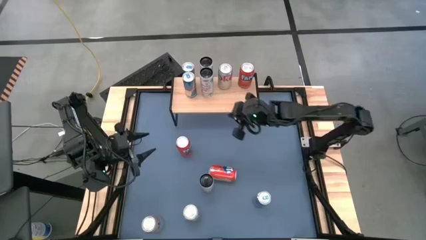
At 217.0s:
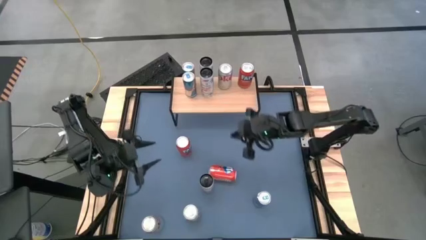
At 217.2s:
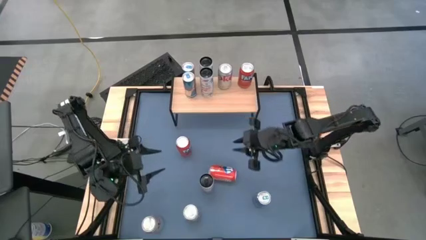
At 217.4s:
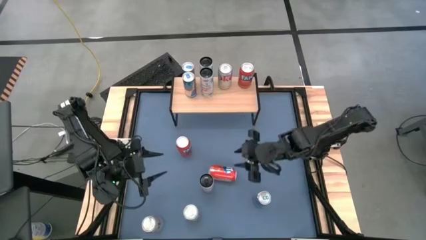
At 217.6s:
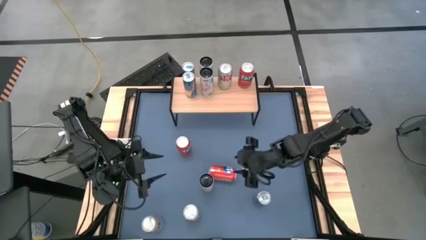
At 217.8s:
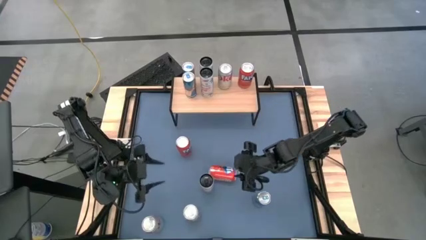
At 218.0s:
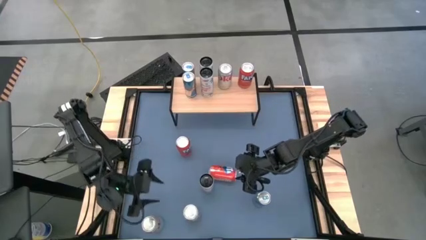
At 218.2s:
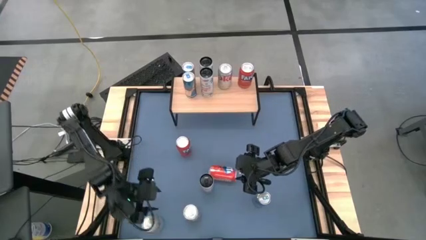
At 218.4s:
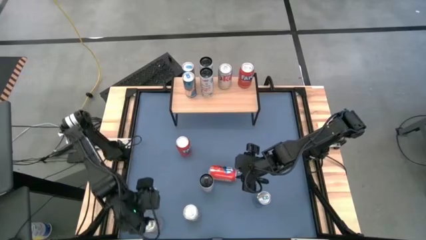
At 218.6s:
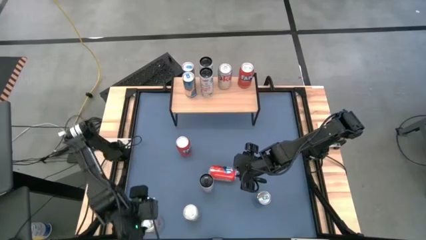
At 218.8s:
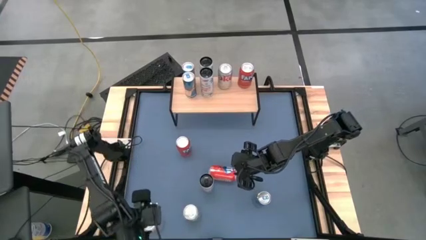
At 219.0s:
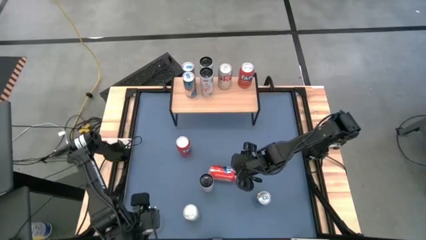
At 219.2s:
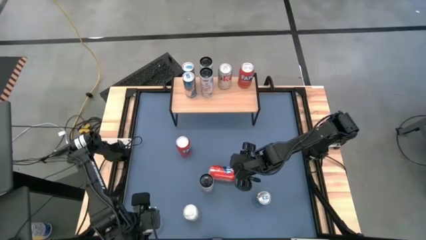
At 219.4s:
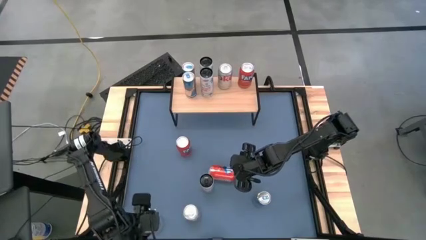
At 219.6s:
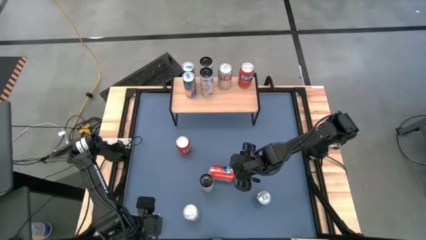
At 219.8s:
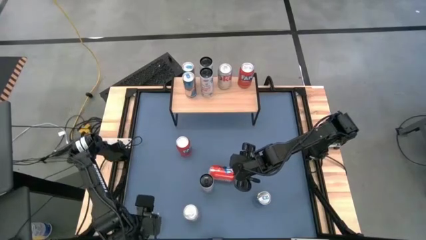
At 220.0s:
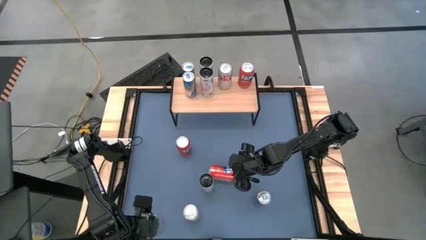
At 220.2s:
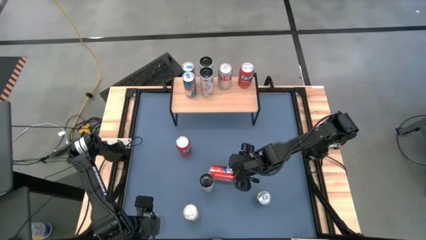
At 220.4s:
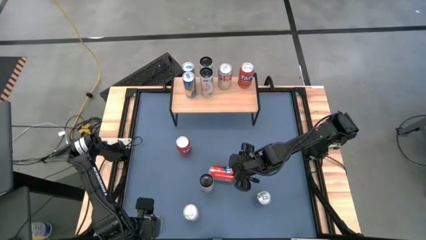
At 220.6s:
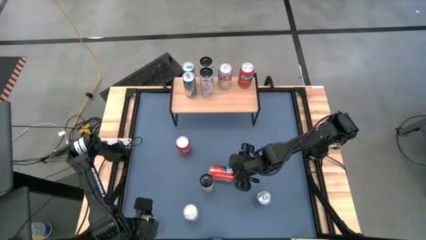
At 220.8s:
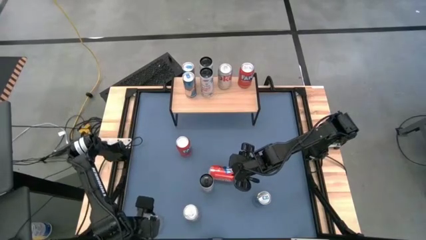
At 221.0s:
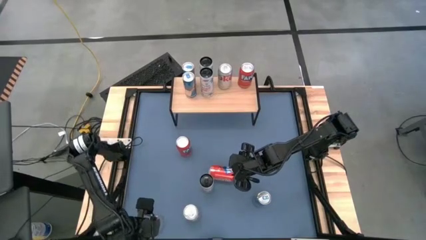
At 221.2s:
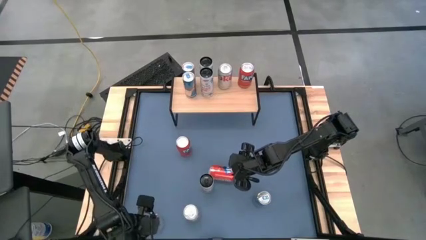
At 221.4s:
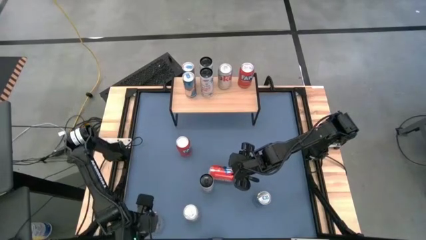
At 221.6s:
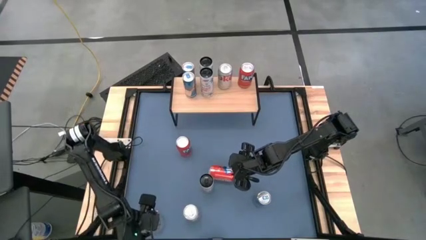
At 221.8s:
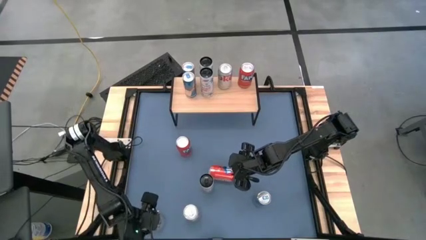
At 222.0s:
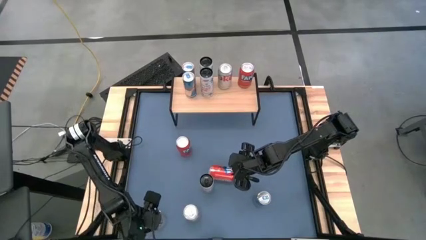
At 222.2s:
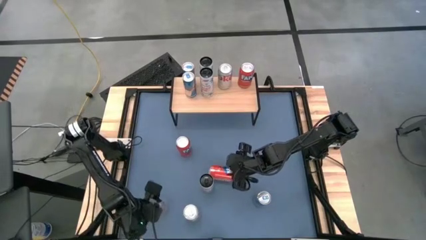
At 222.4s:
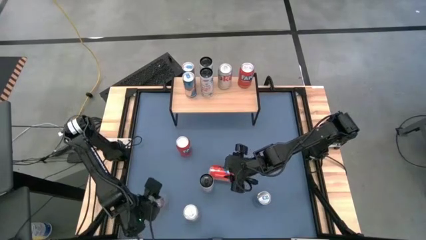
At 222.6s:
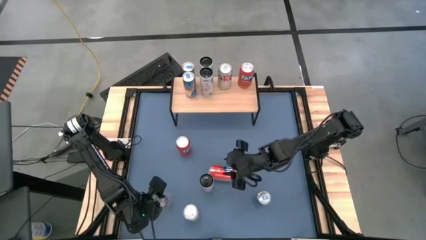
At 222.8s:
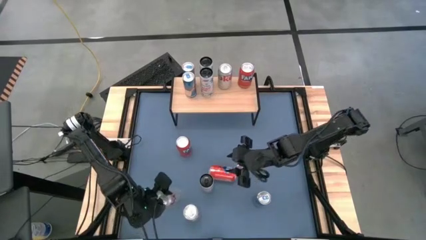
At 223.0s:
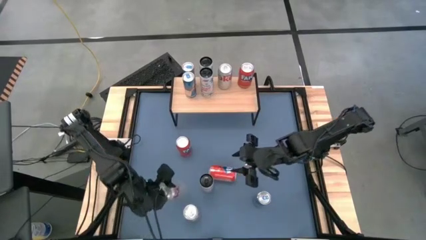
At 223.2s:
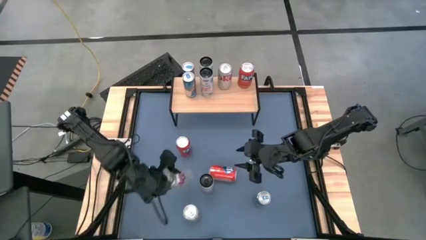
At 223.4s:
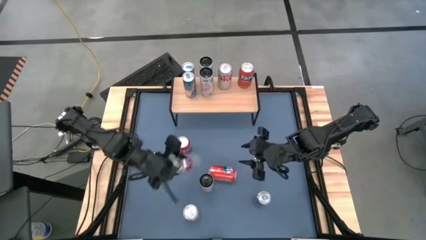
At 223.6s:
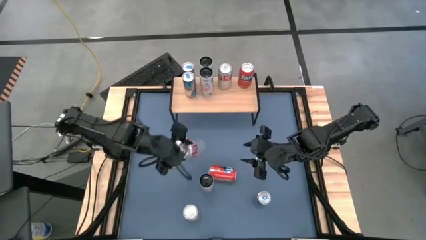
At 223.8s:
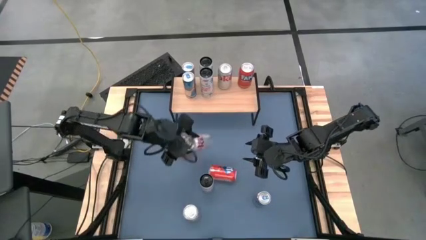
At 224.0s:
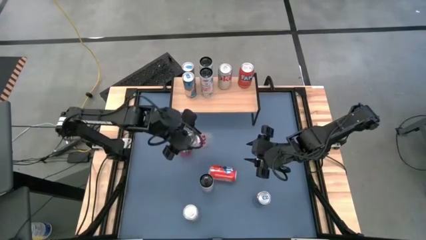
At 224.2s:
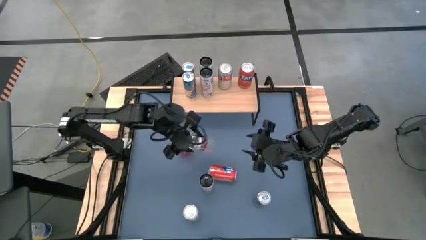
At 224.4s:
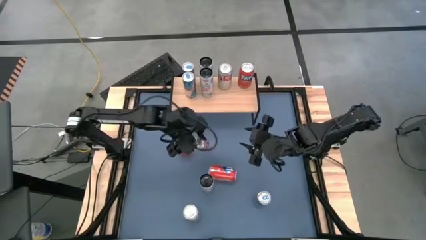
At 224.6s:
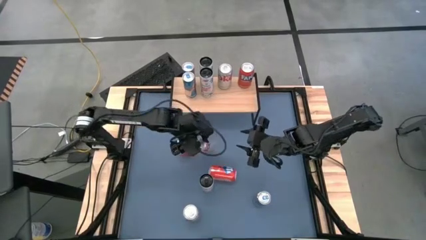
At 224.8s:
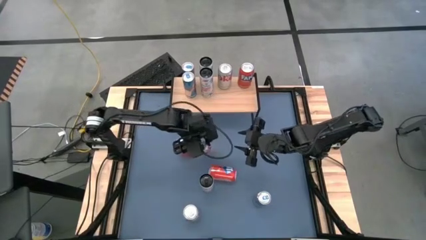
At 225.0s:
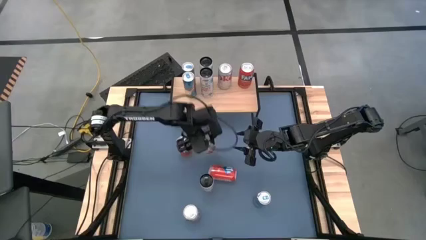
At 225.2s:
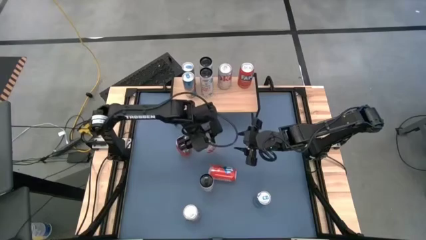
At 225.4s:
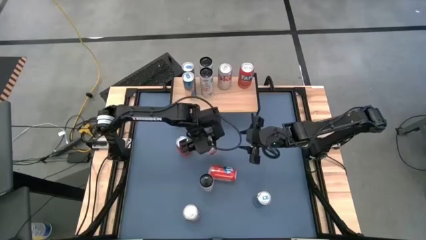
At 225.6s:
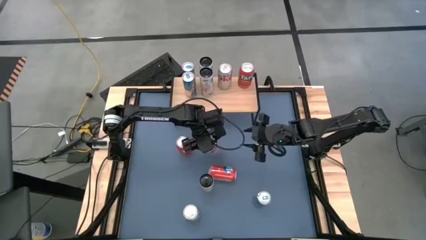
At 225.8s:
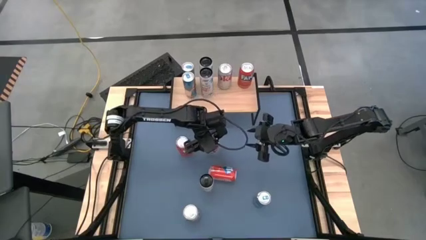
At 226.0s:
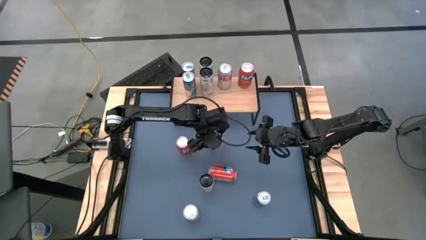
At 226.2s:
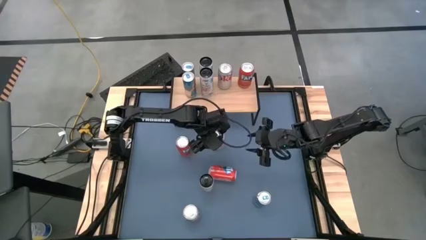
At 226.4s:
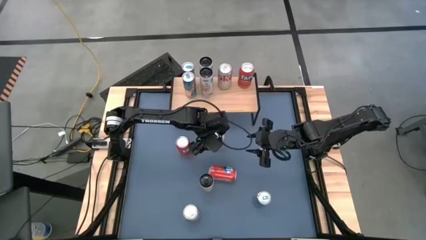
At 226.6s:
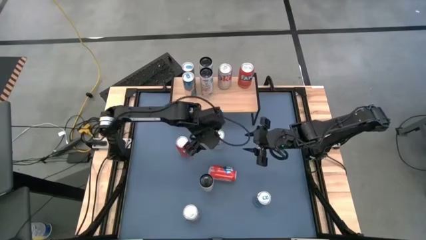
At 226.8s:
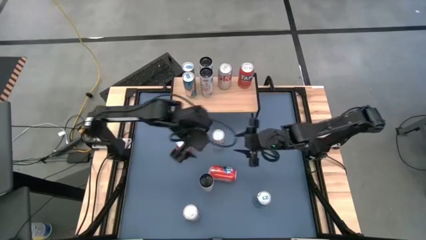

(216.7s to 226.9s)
Task: Place canned beverage on shelf
Move the bottom left silver soda can to the center of the table
